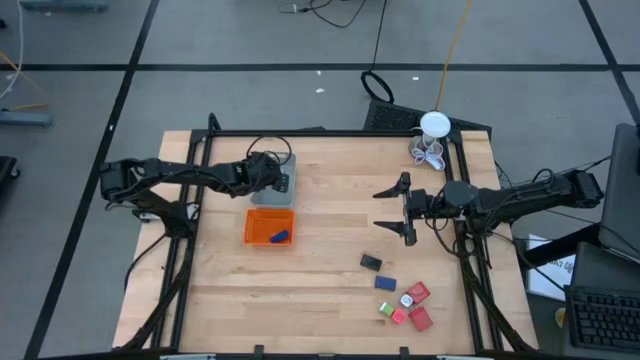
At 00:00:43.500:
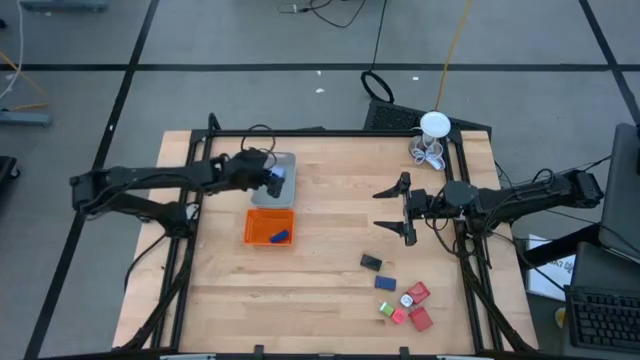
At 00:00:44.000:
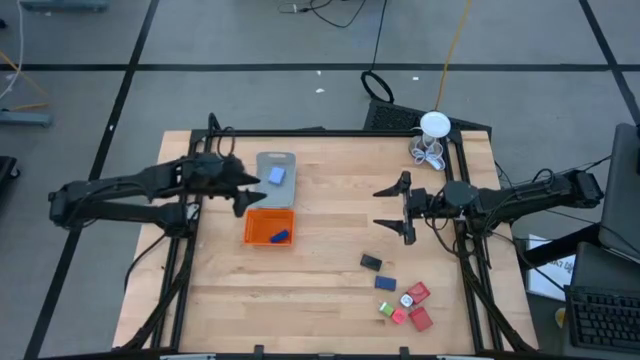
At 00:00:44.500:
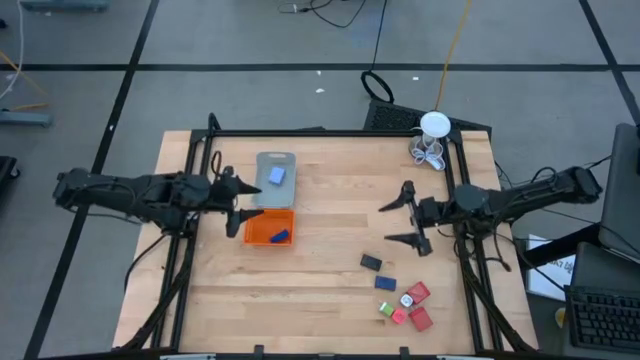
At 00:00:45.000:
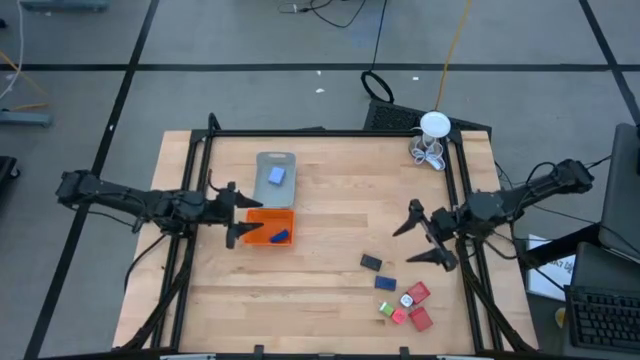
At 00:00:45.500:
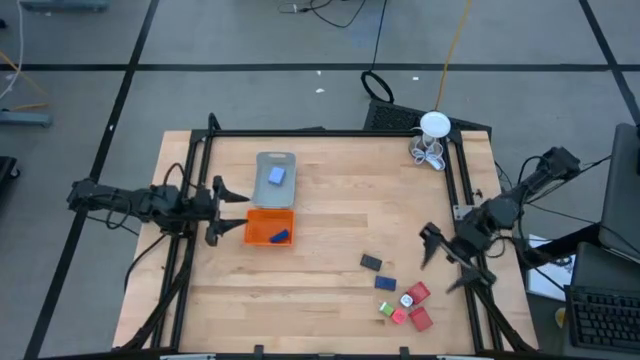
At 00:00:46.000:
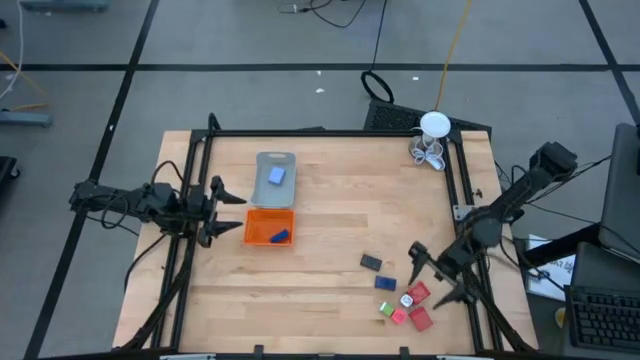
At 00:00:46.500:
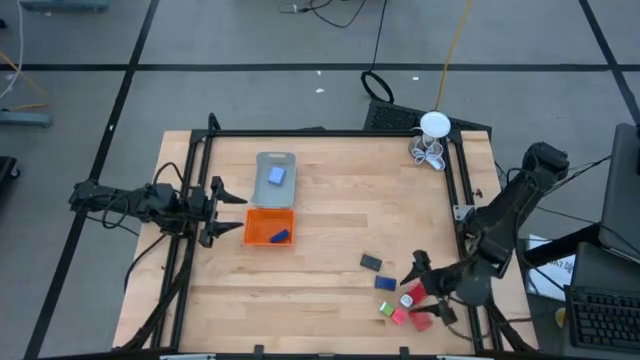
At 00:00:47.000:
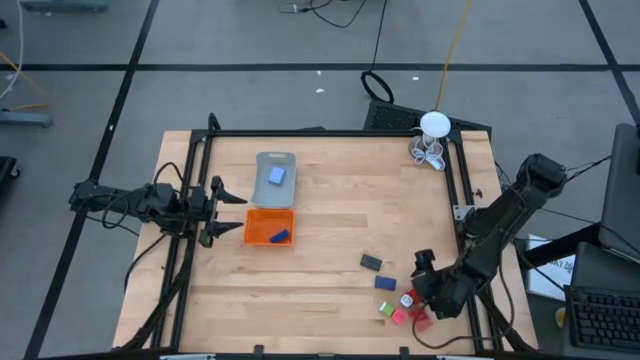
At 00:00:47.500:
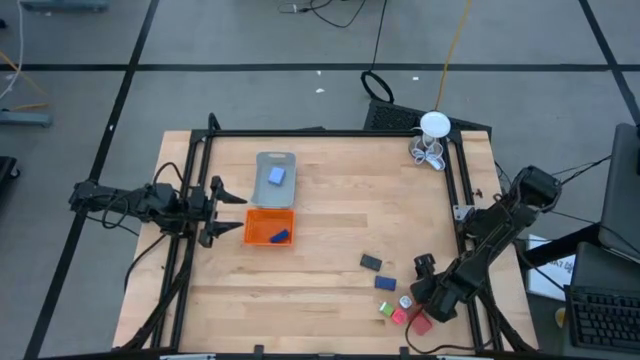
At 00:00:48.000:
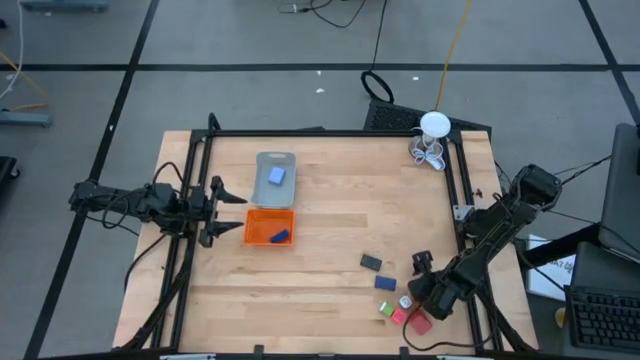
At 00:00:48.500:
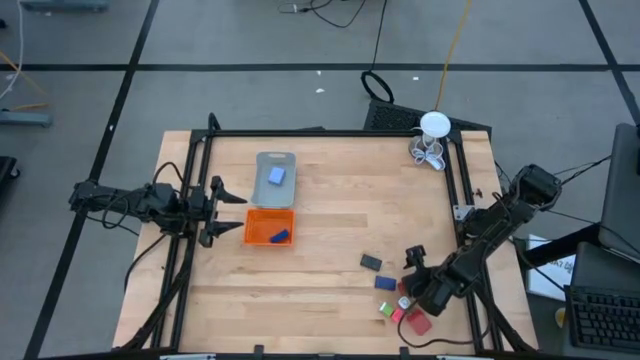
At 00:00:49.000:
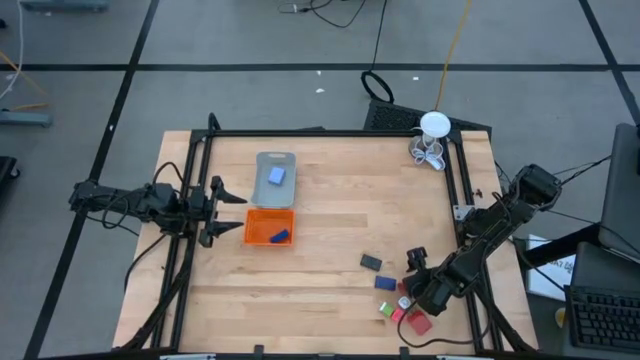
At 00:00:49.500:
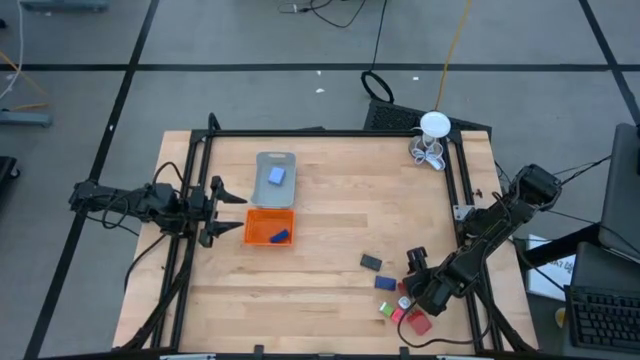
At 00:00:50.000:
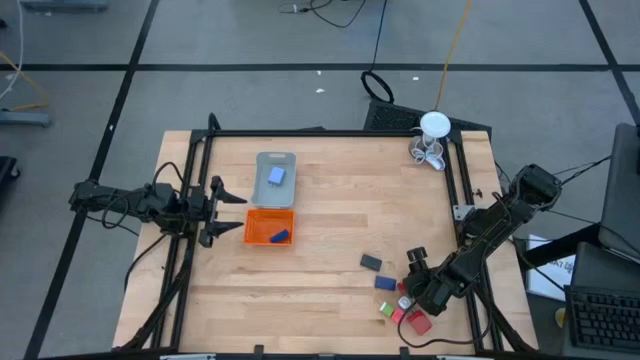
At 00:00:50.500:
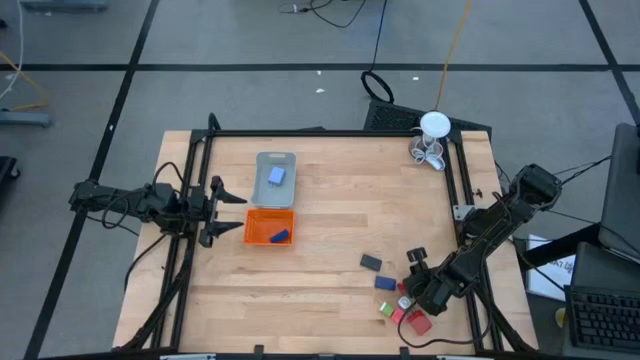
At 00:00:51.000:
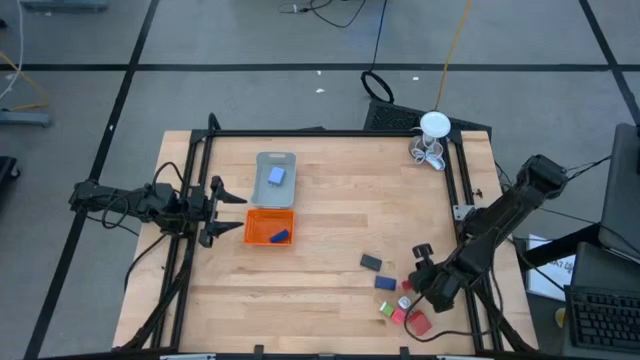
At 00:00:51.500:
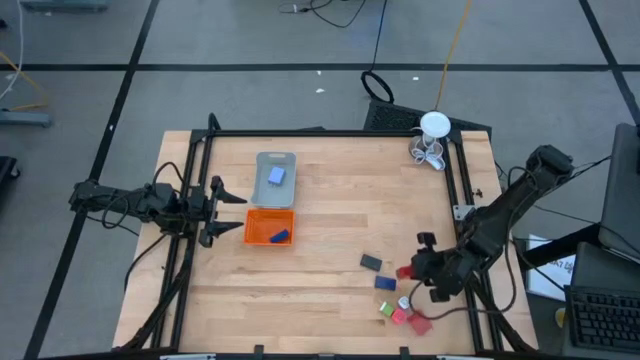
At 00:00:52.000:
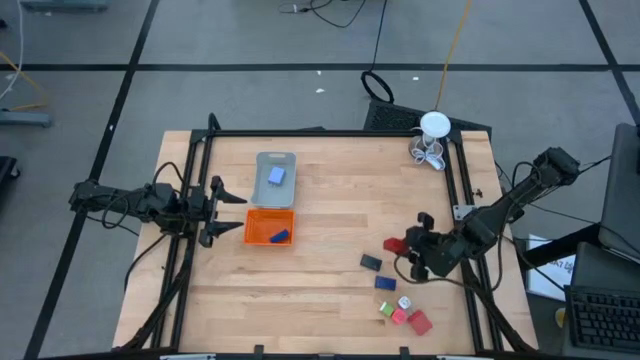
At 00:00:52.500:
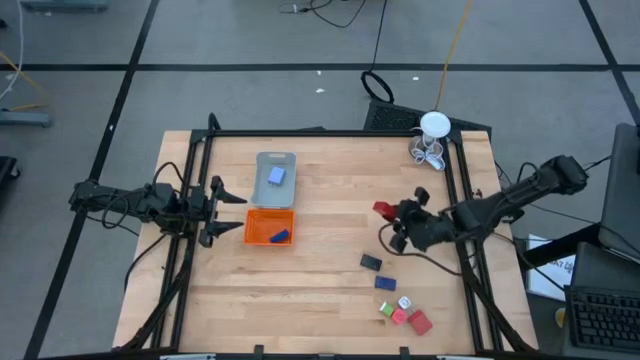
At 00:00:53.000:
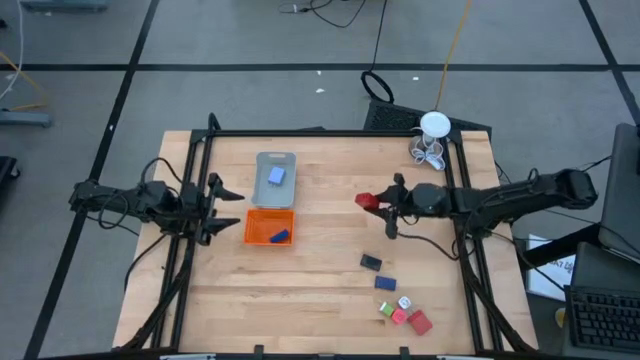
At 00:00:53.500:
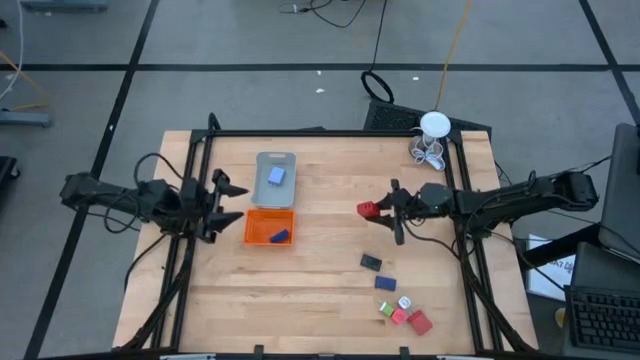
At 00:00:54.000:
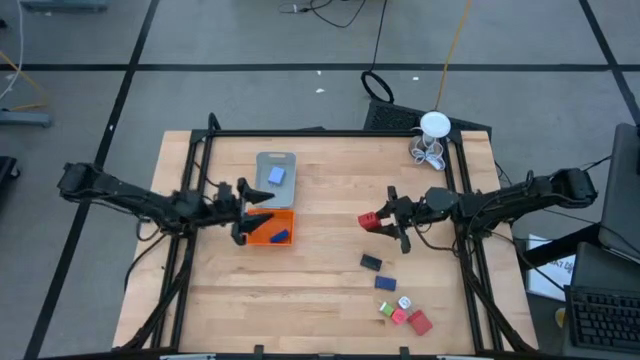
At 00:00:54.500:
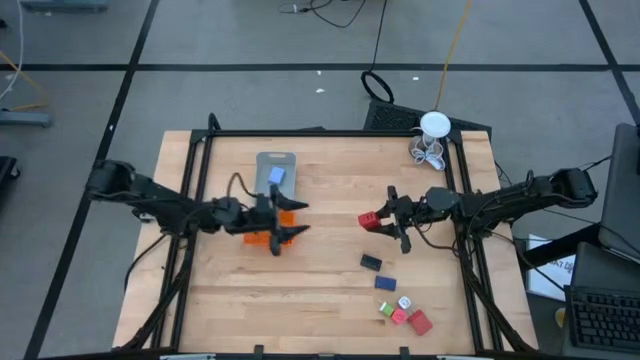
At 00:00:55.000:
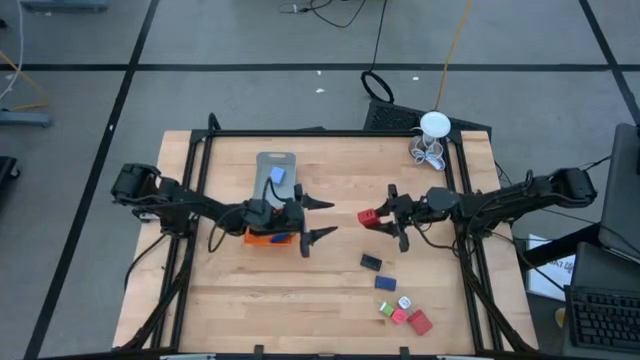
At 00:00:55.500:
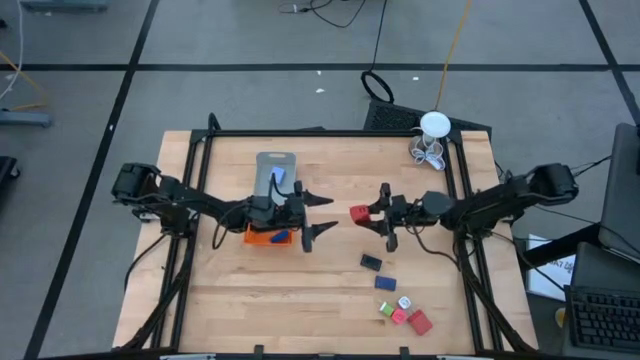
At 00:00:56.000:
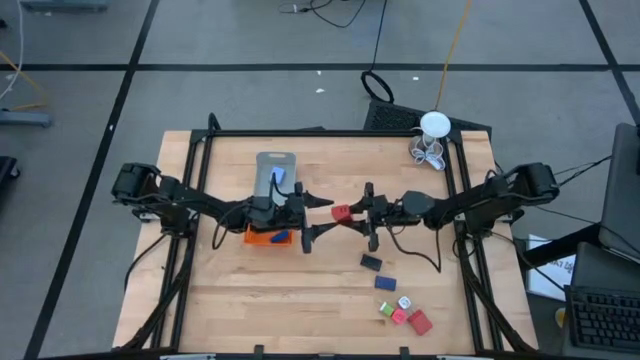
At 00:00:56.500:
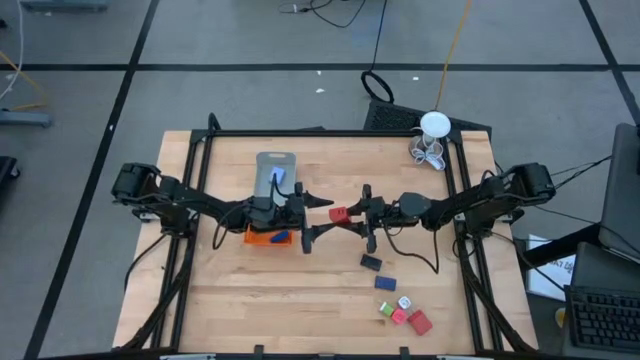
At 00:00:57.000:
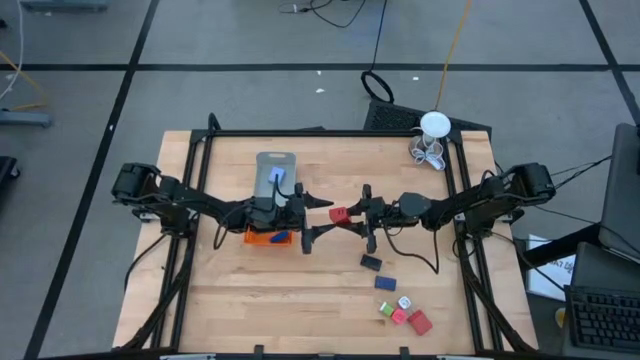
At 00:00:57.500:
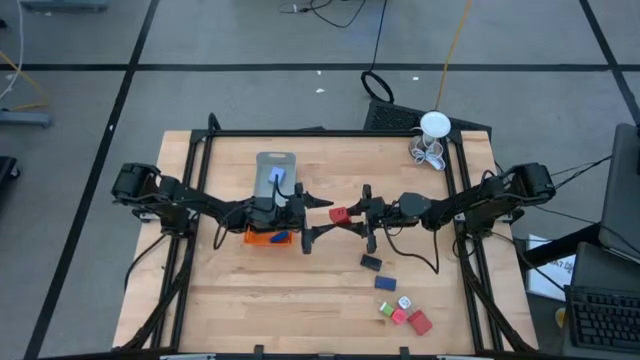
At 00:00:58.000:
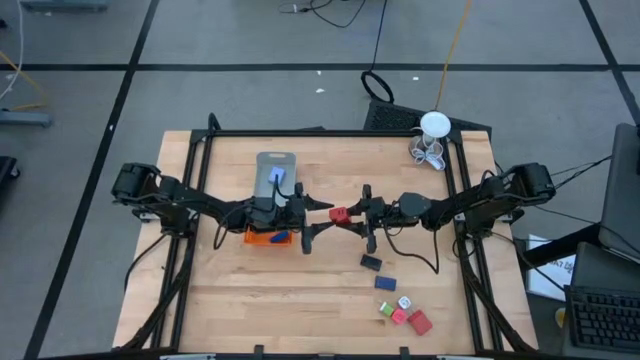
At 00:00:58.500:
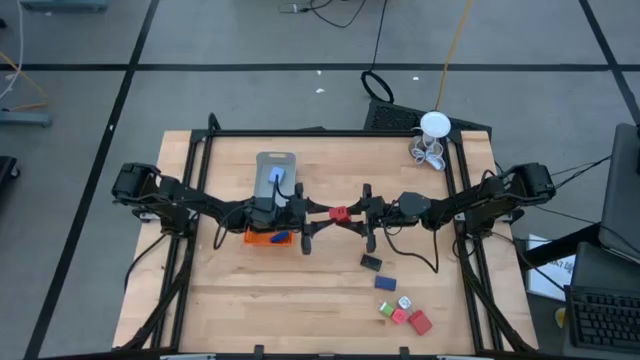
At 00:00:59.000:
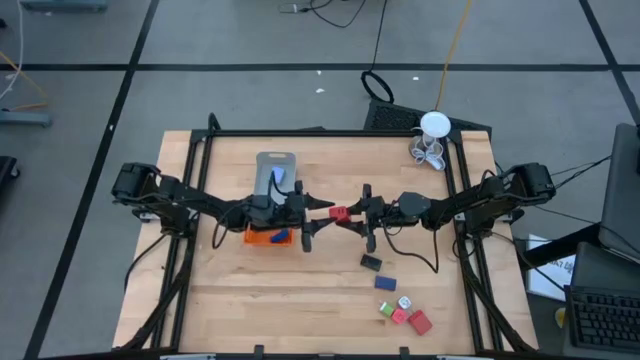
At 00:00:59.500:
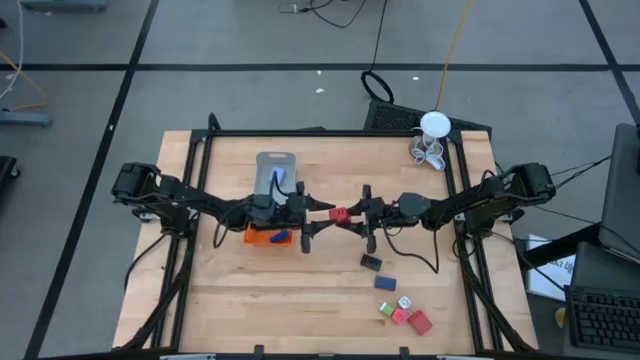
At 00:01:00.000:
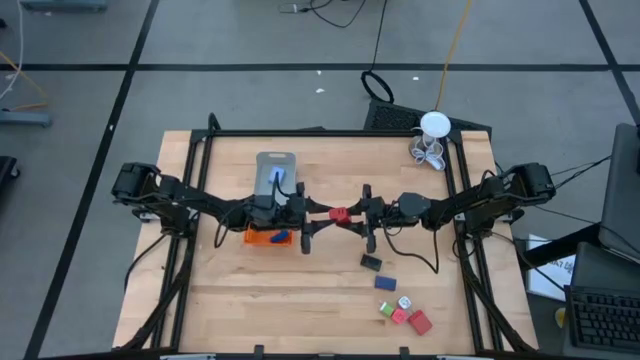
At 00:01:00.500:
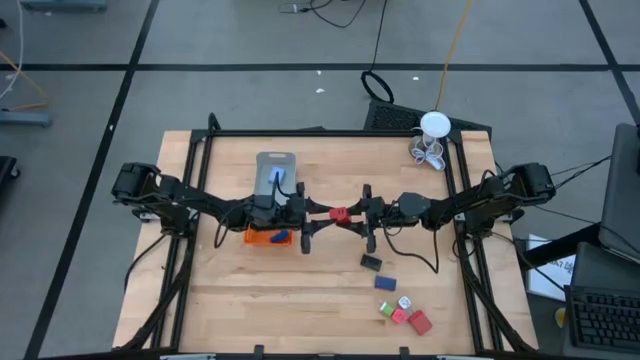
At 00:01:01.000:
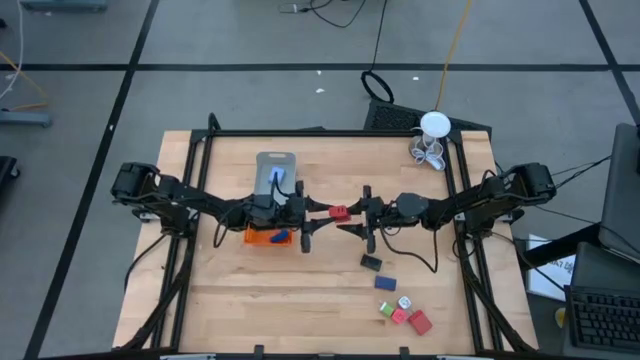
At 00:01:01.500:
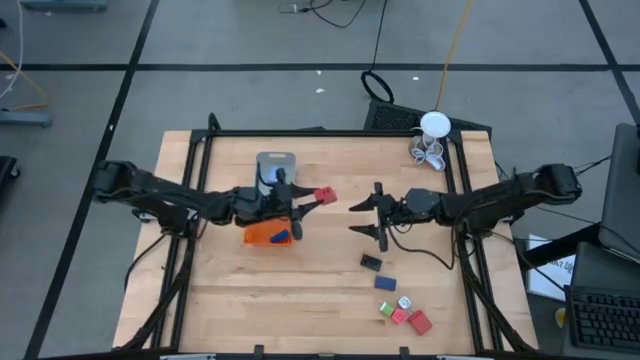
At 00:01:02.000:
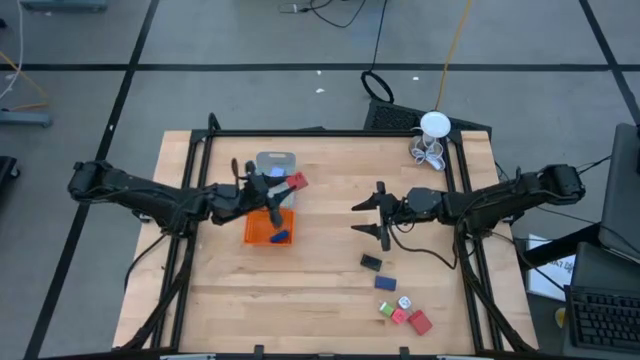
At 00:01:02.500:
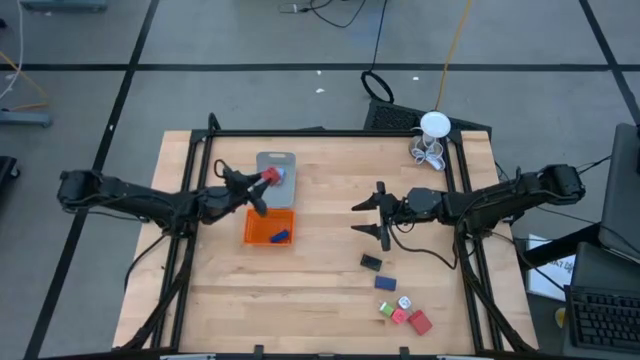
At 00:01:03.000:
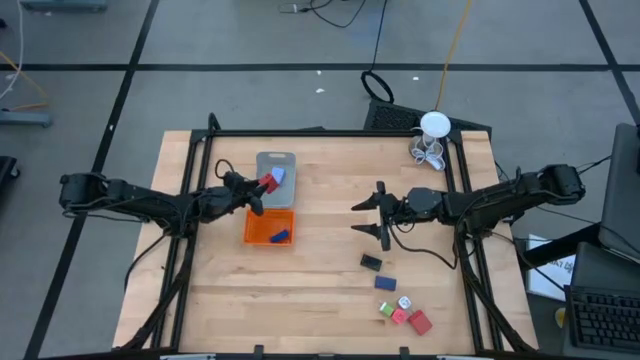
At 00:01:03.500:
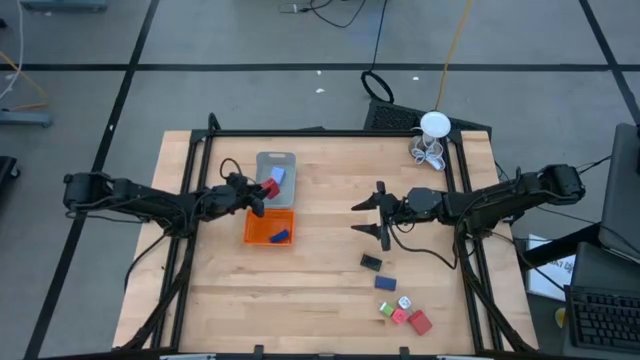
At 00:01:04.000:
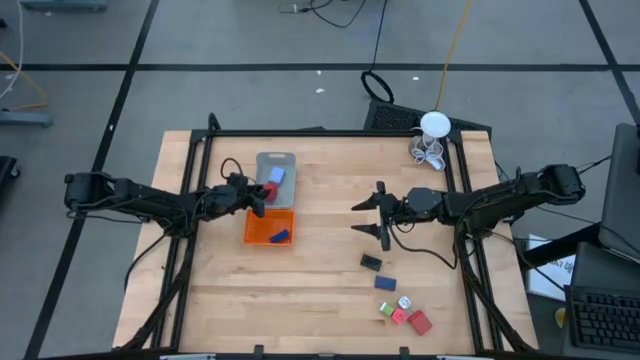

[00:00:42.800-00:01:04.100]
Task: Pick & Place Office items
Put the top red charger adapter into the gray bin
